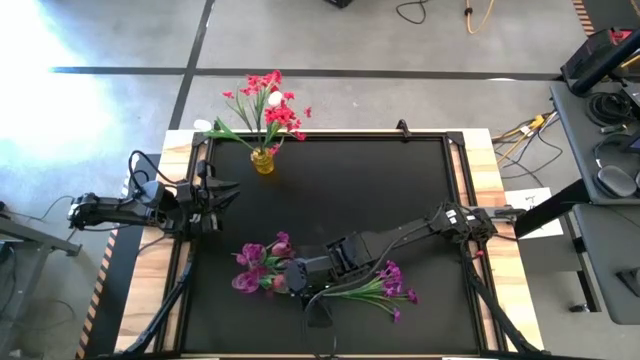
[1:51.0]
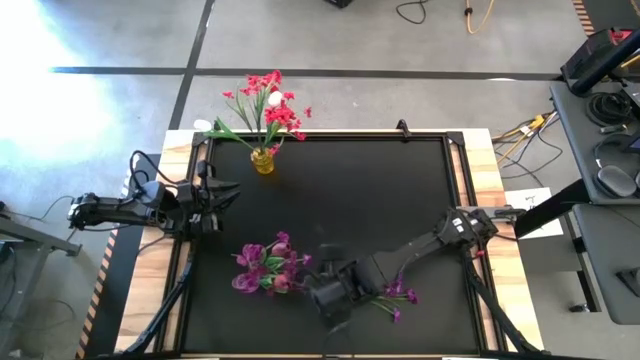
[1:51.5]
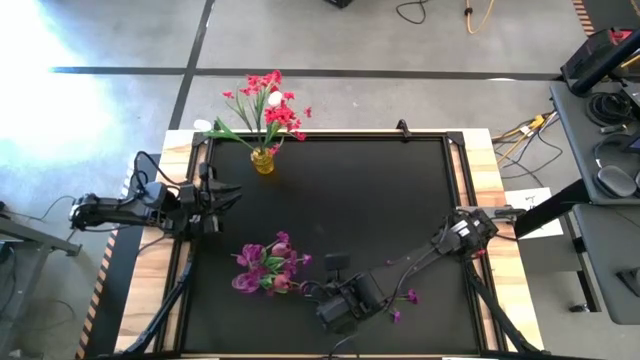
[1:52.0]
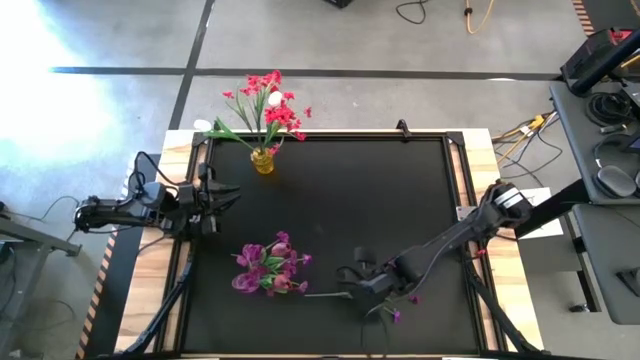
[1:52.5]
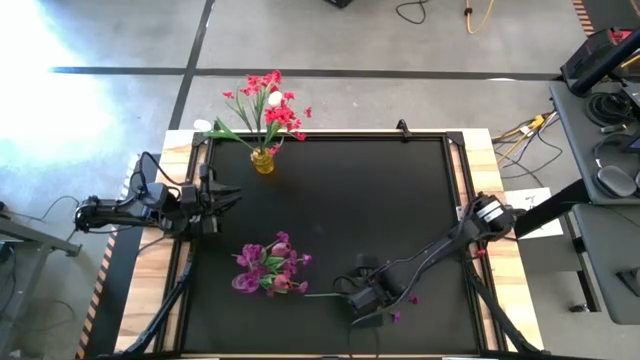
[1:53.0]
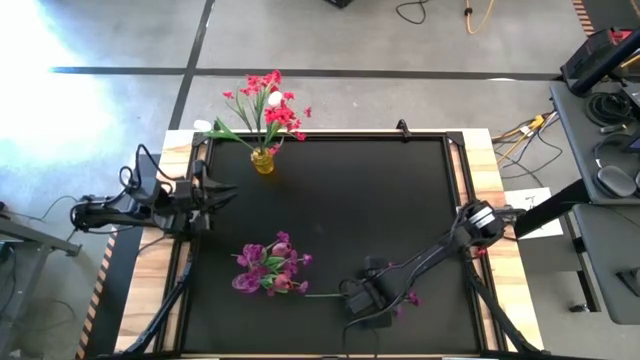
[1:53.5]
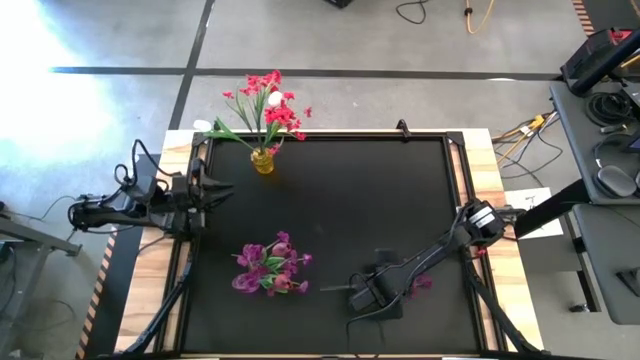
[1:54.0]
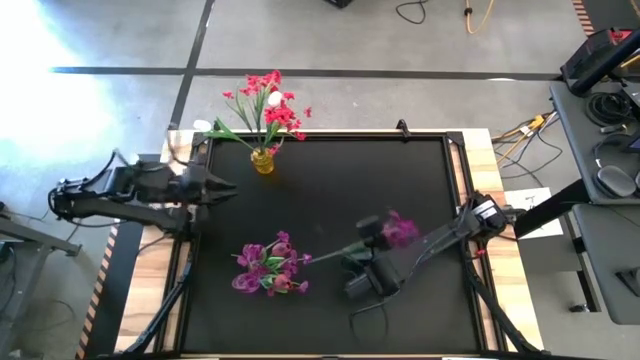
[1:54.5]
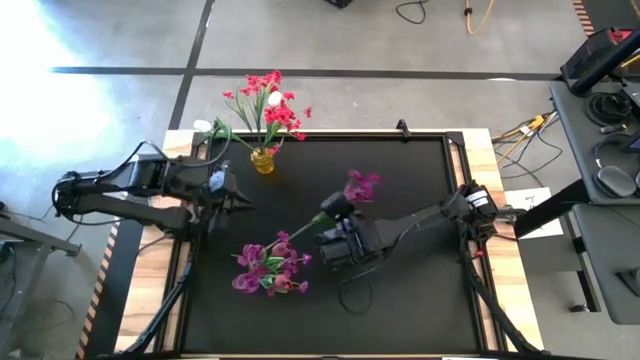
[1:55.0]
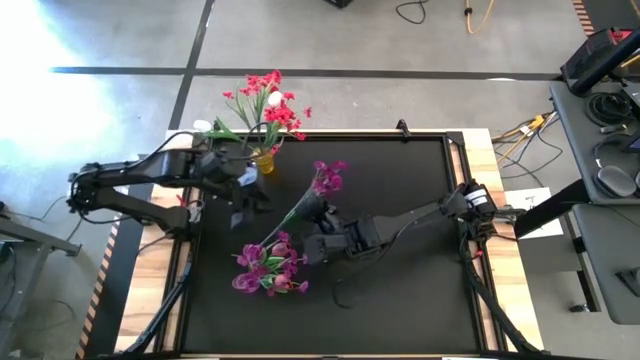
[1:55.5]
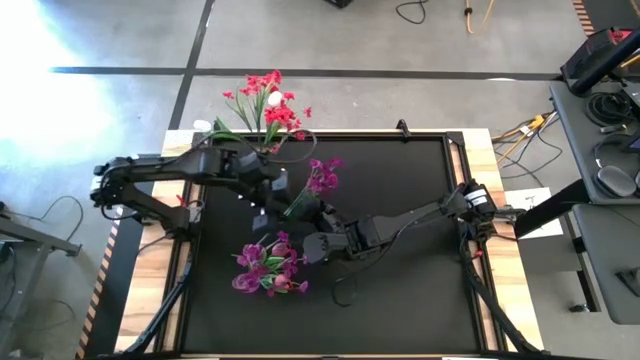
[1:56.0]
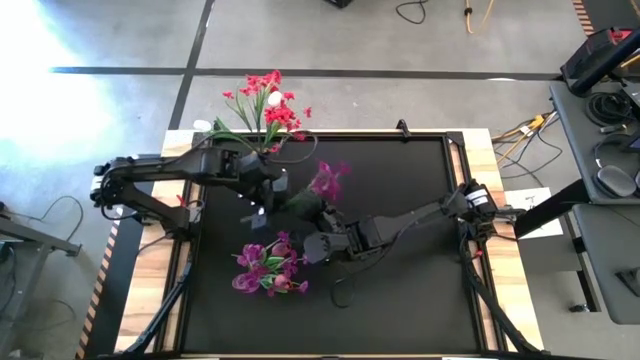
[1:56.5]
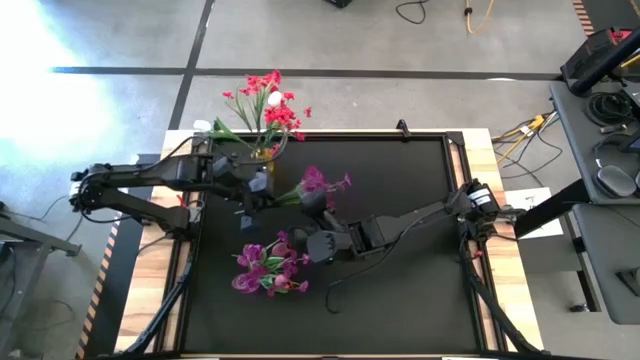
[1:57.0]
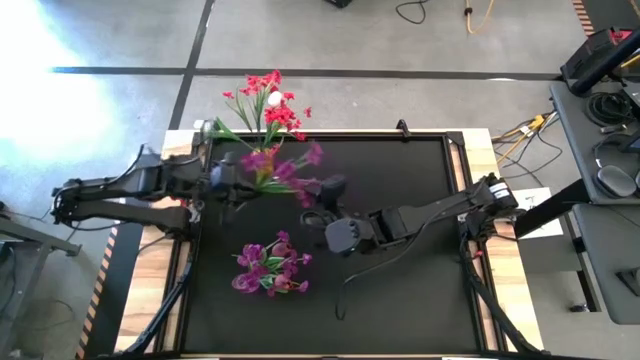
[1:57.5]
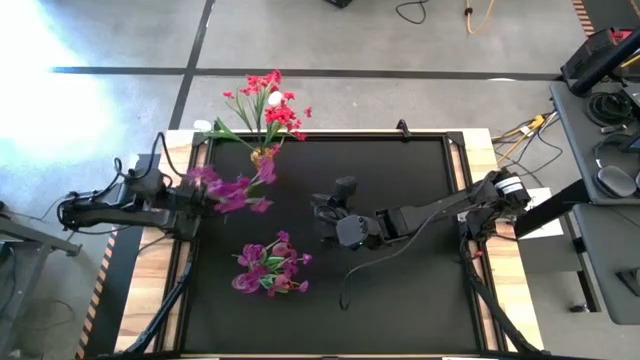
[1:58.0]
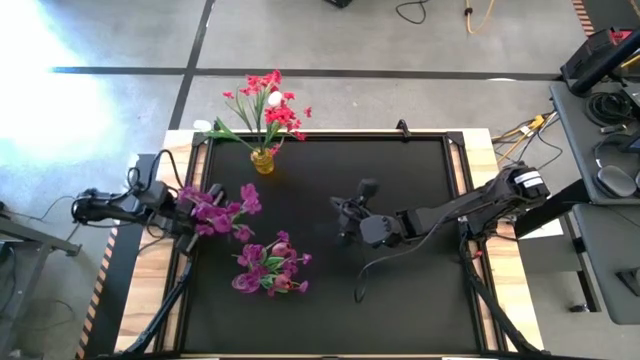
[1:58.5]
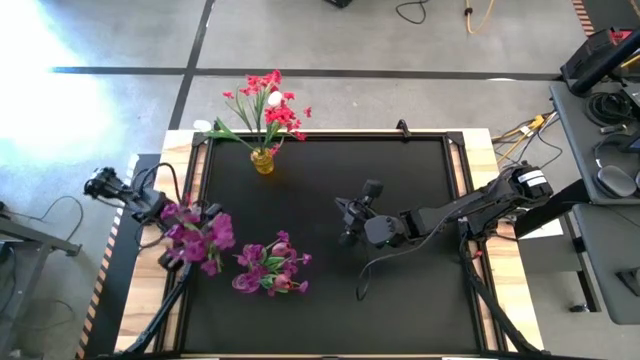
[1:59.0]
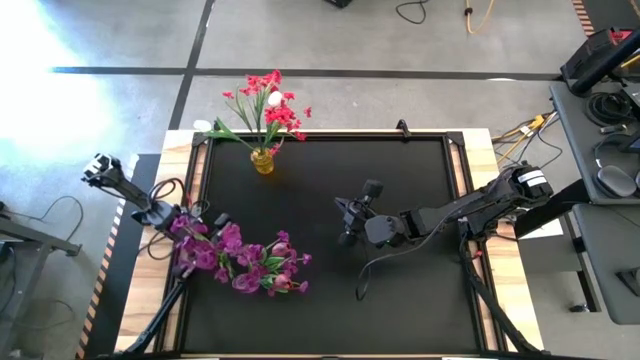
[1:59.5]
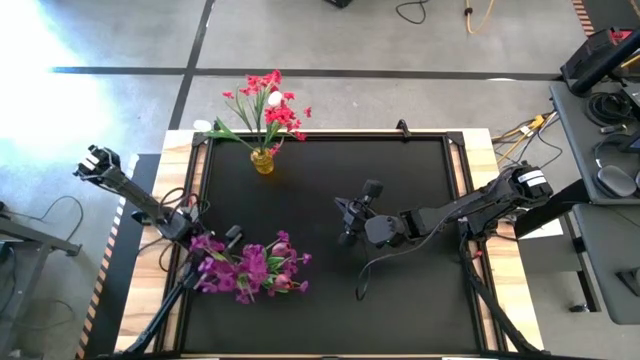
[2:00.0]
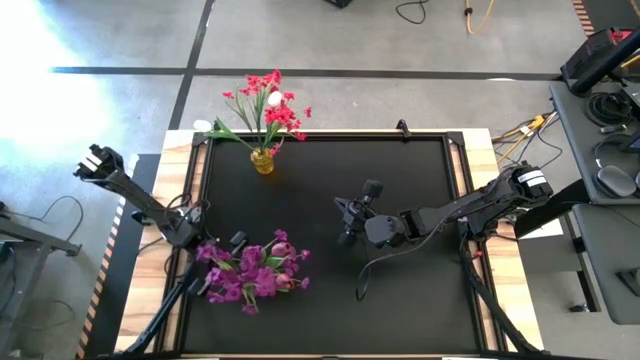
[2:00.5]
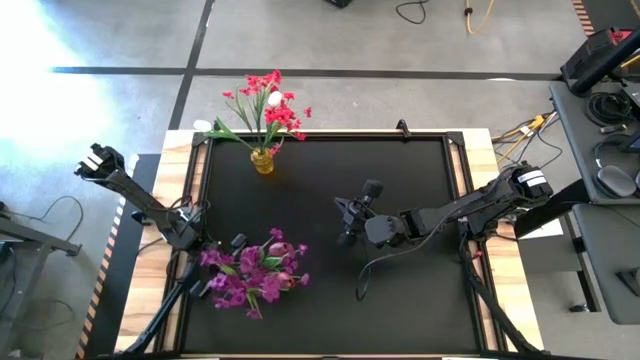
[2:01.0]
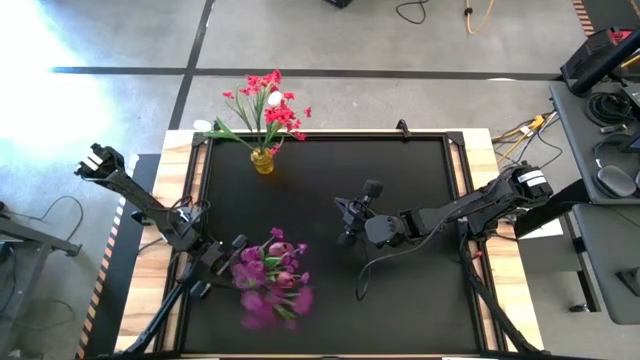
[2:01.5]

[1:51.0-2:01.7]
Task: Sort flowers into vase by color
Put the violet flowers into the violet vase

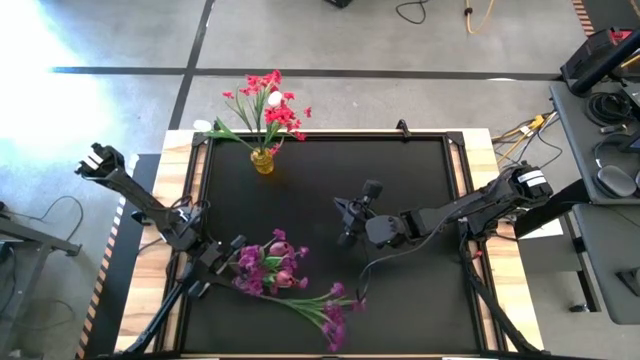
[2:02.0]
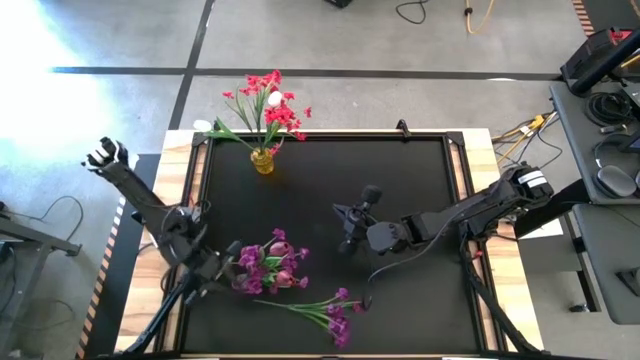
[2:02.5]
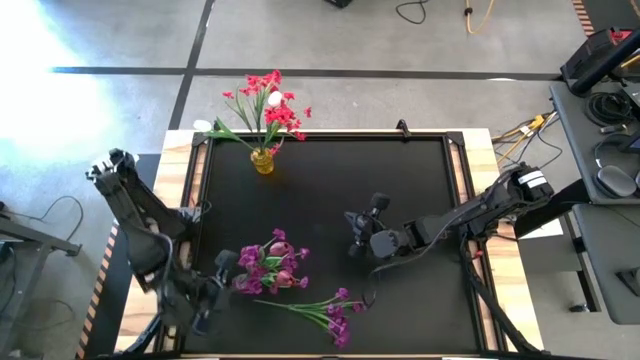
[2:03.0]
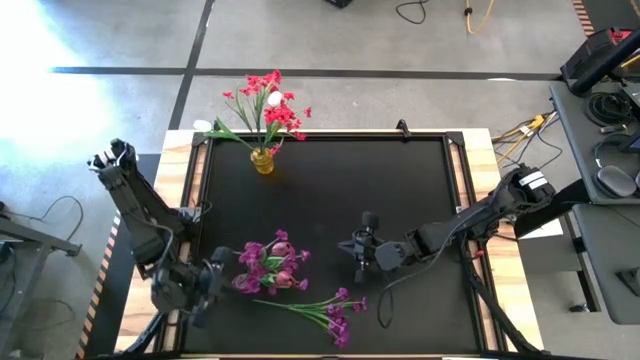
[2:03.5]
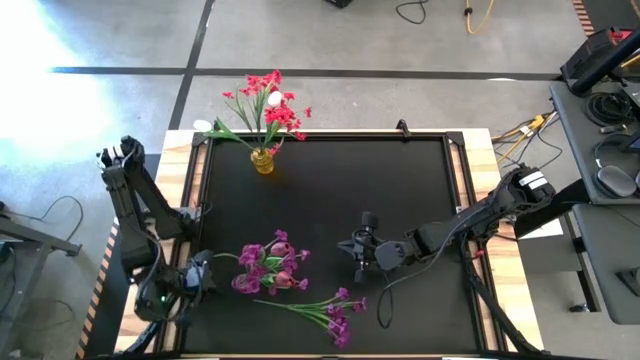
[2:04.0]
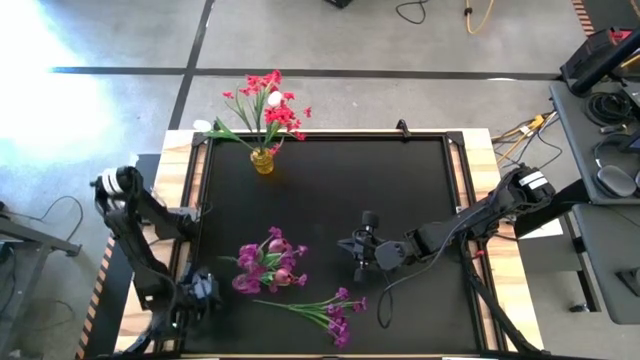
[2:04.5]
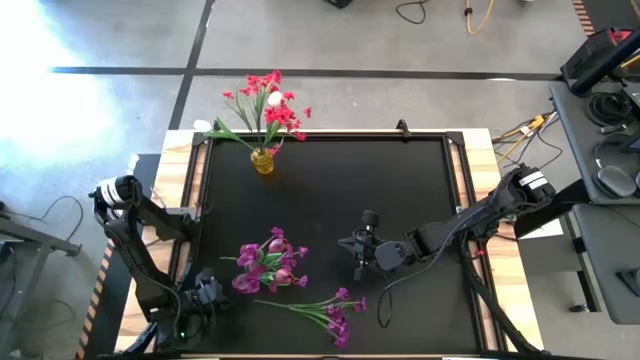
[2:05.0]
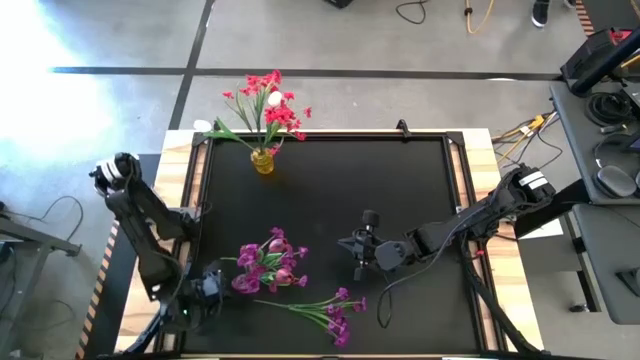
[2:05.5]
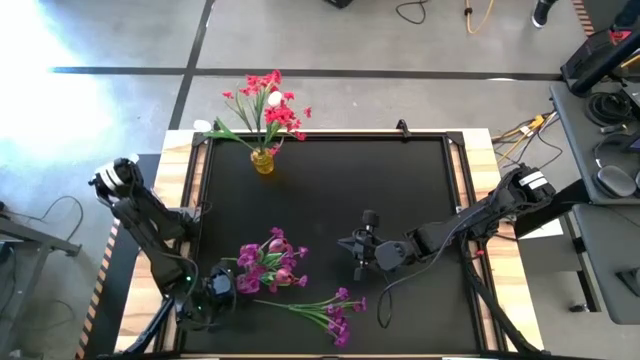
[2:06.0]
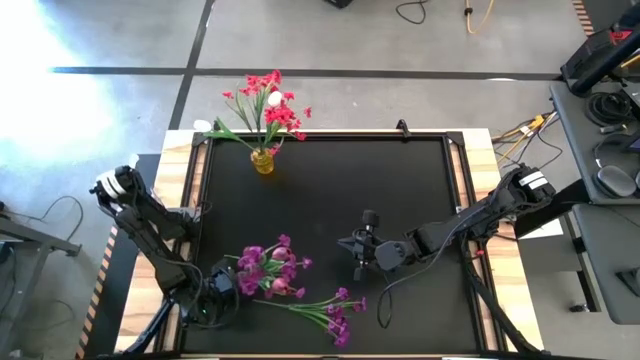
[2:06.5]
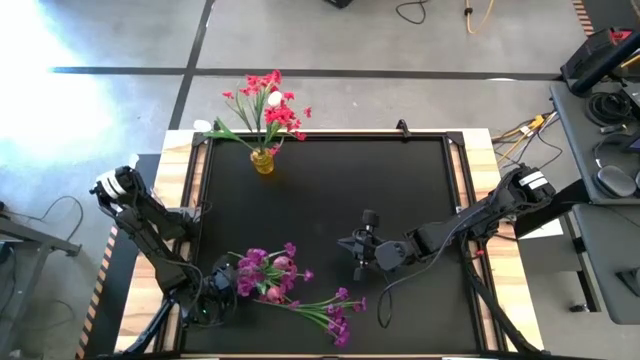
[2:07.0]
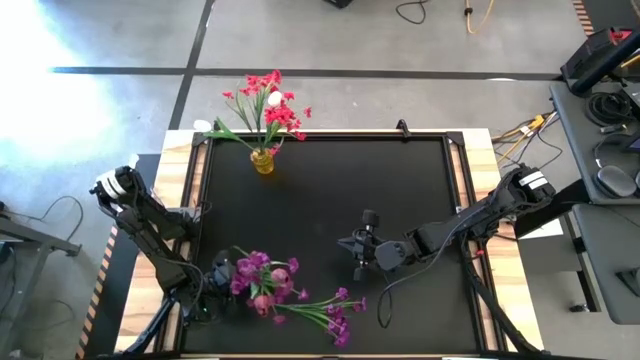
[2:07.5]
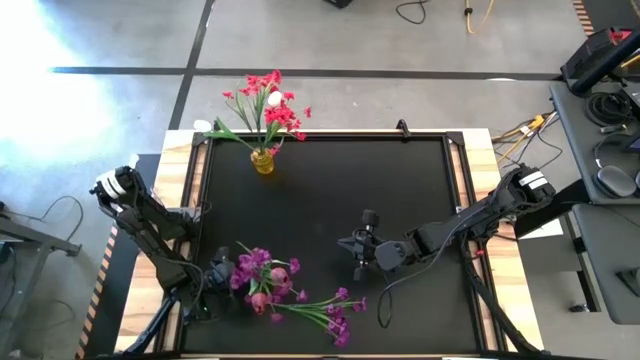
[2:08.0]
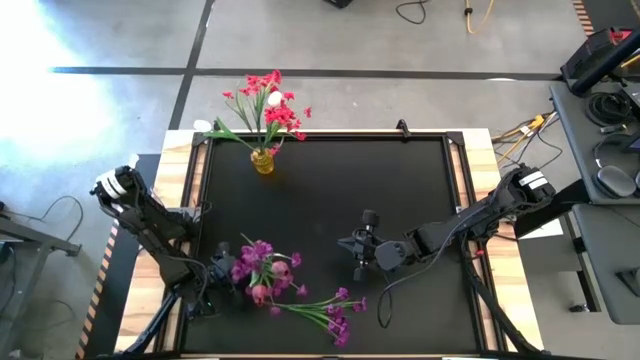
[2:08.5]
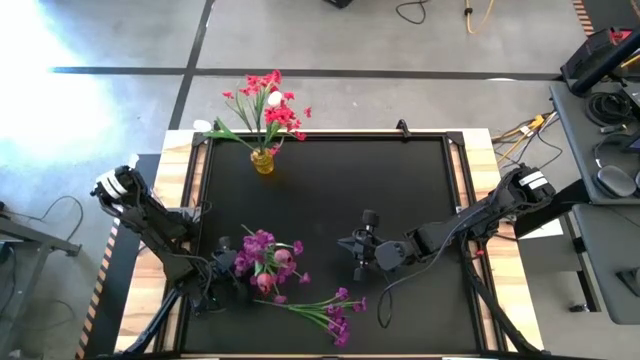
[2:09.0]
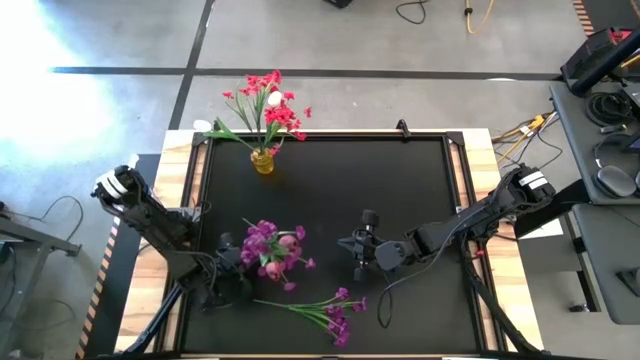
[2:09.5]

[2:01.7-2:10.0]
Adjust the violet vase
